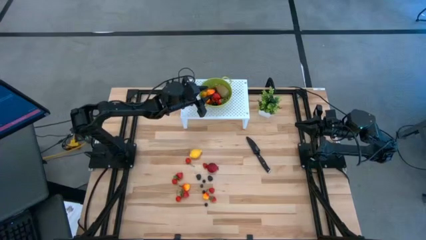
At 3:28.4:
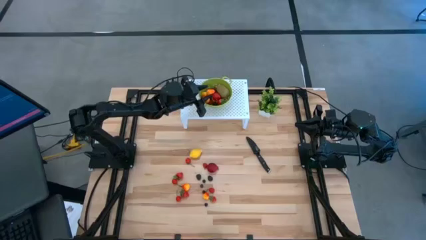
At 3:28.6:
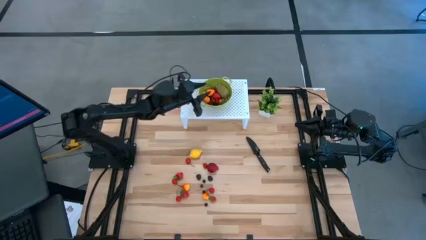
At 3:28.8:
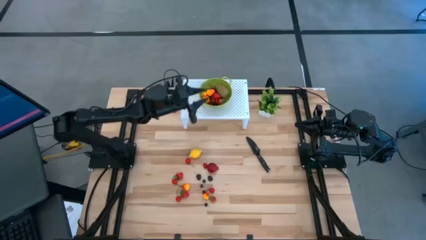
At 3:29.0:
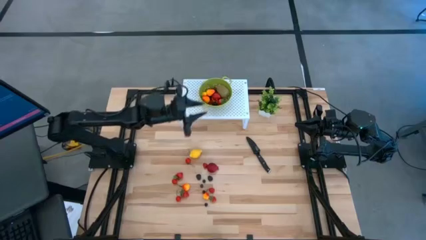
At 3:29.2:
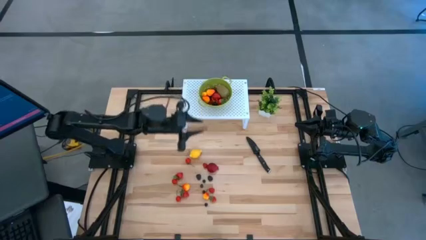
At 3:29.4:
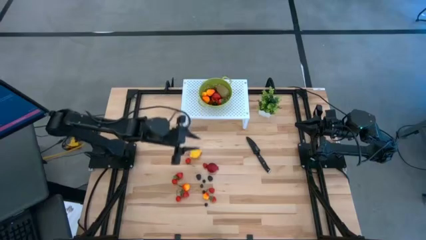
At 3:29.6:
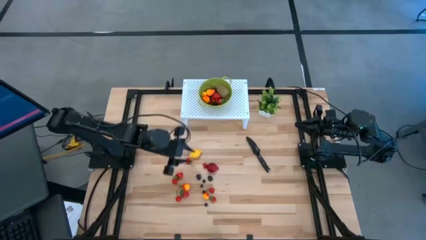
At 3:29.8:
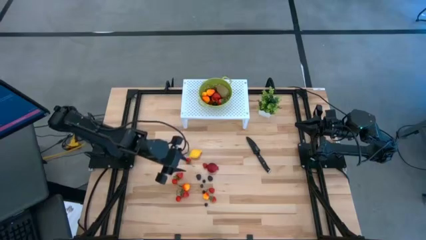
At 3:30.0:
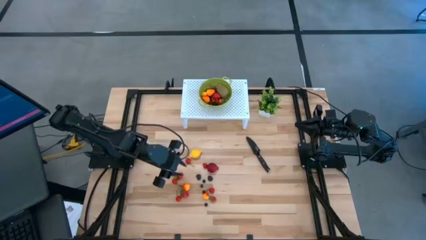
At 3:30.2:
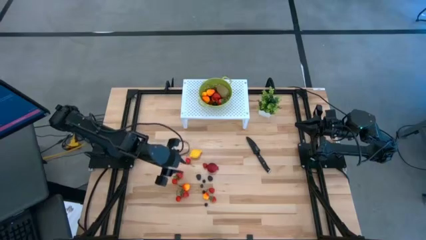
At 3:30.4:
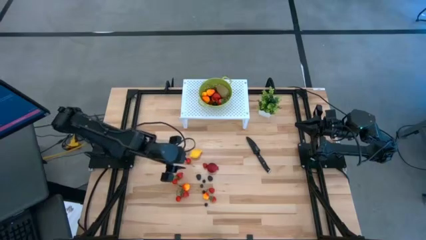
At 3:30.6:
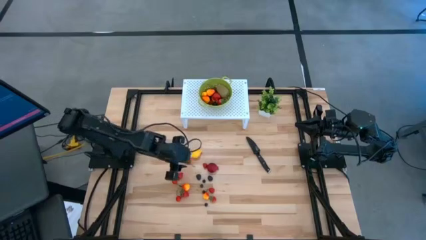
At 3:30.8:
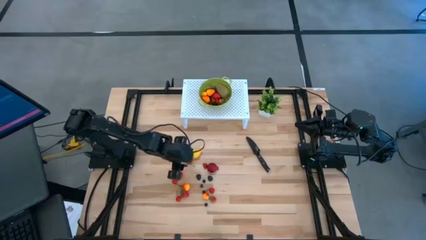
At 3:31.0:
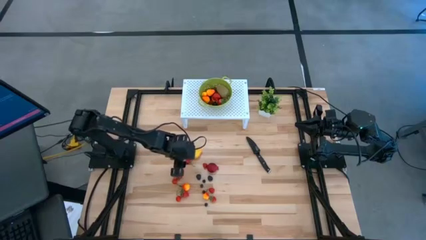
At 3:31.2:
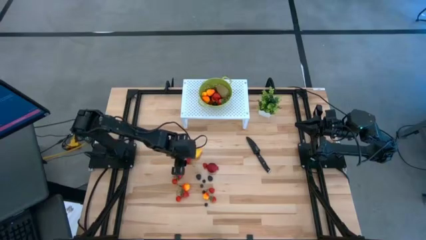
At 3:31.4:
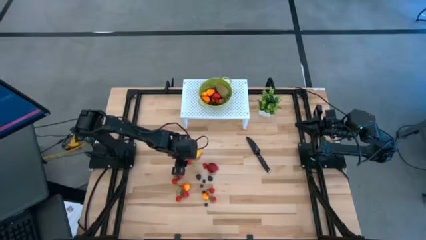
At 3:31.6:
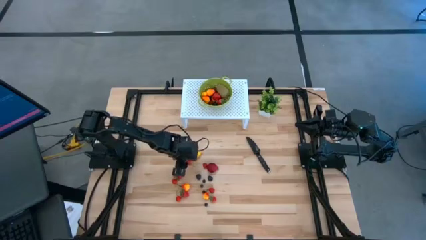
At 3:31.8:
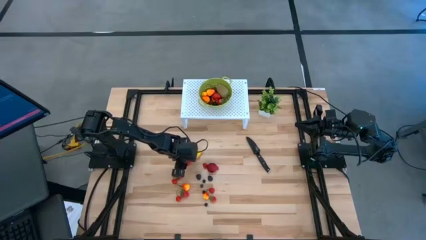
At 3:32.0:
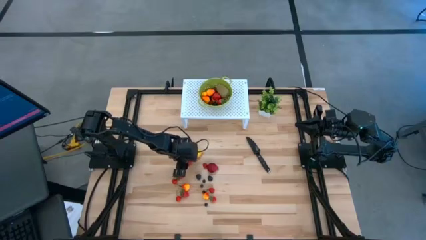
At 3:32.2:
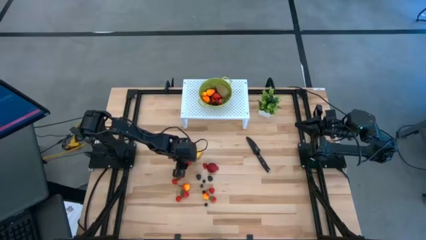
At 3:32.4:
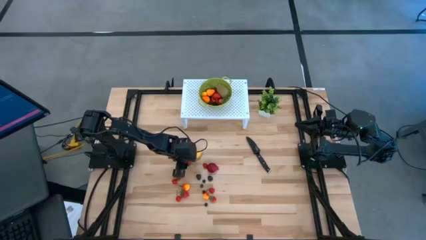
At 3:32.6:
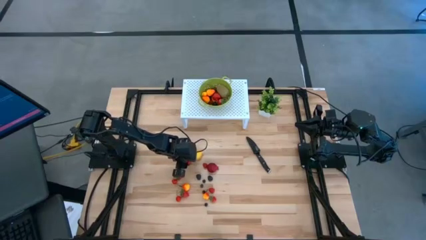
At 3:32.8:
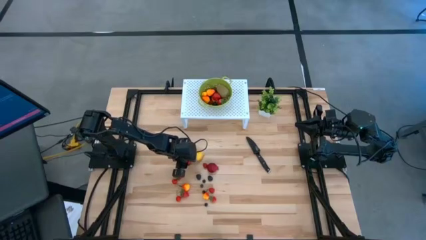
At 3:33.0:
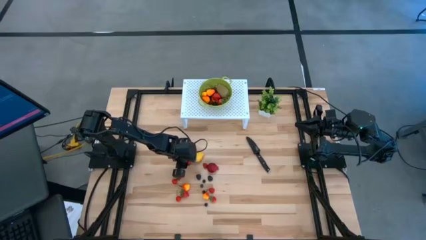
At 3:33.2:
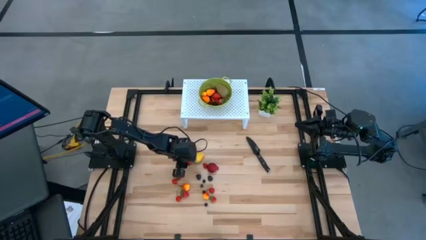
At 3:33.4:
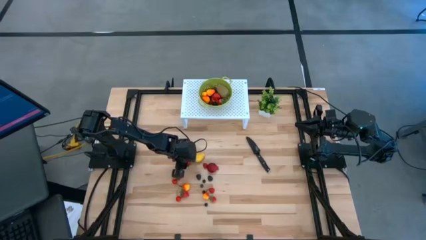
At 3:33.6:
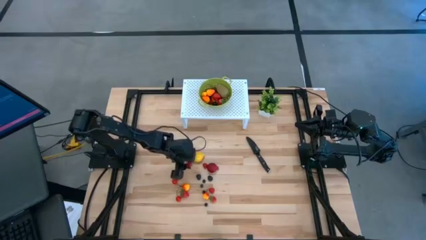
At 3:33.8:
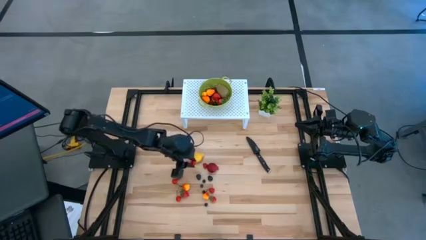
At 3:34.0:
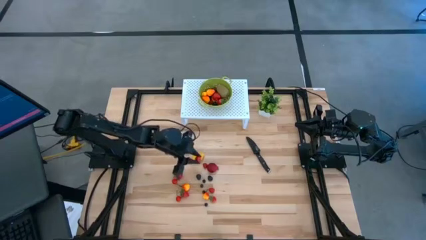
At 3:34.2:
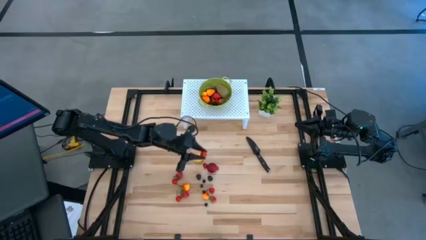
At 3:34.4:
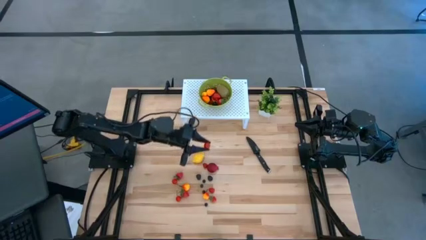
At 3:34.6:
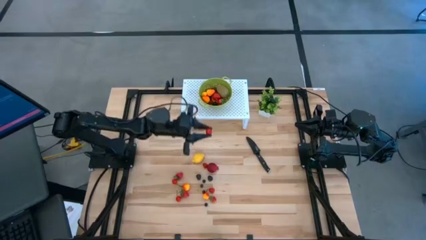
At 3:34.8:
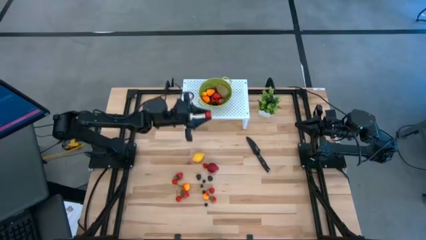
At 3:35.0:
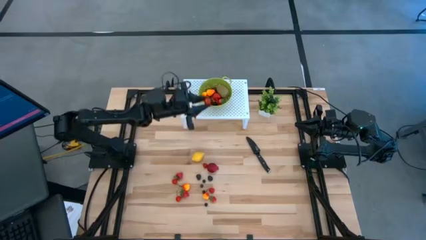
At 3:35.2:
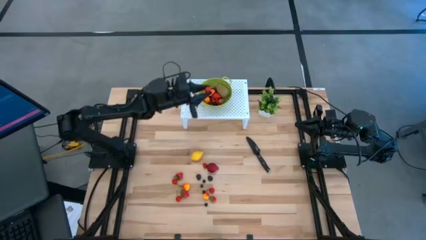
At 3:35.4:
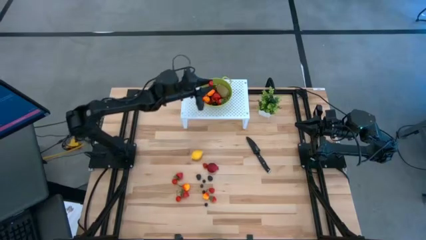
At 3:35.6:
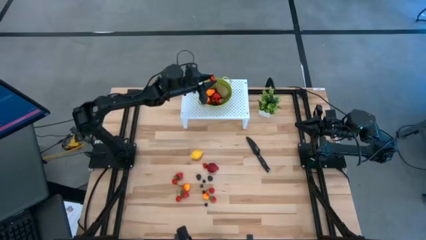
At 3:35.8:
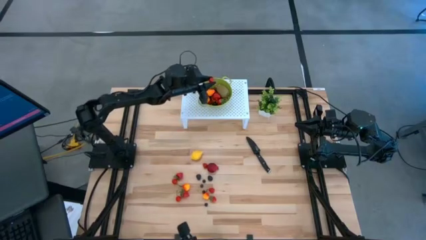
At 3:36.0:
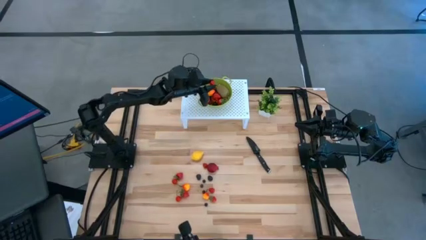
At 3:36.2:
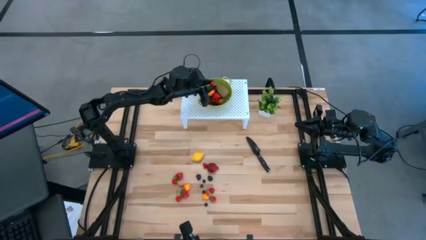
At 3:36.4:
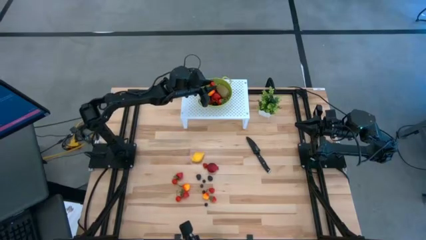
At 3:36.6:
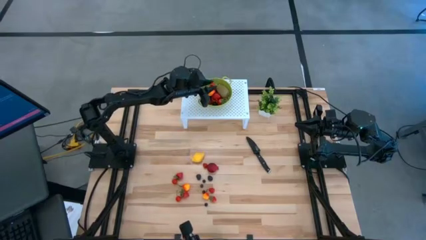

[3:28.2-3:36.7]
Task: Pick & Place Fruit
Put the red cherry into the green strainer bowl

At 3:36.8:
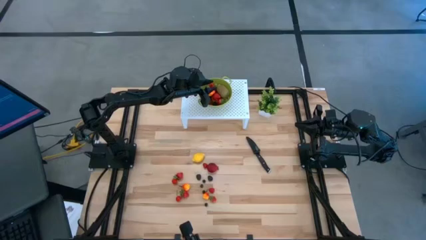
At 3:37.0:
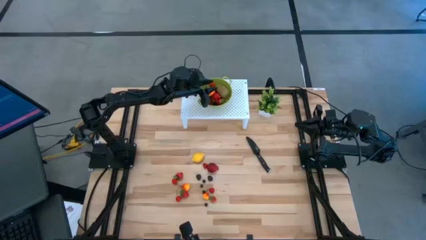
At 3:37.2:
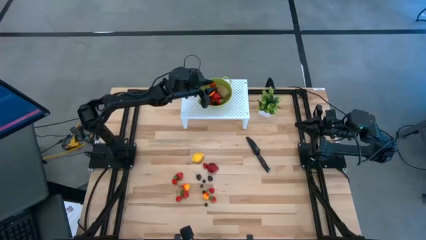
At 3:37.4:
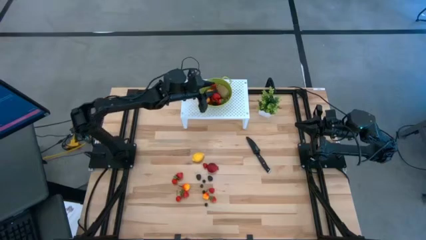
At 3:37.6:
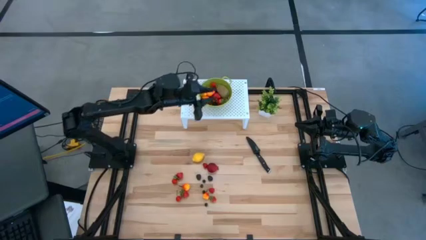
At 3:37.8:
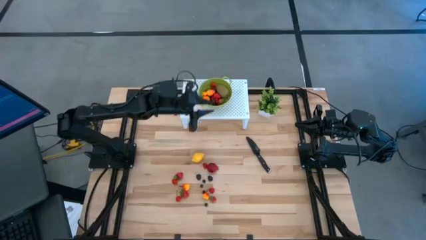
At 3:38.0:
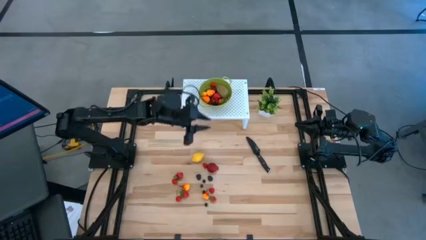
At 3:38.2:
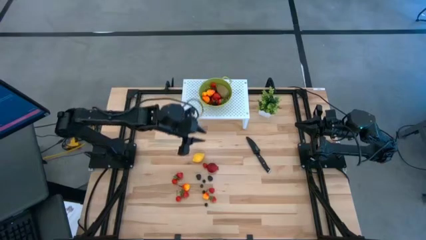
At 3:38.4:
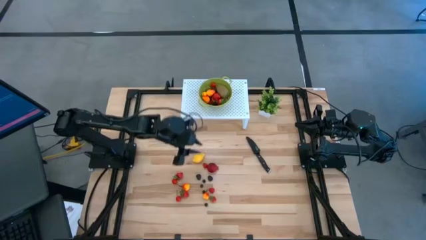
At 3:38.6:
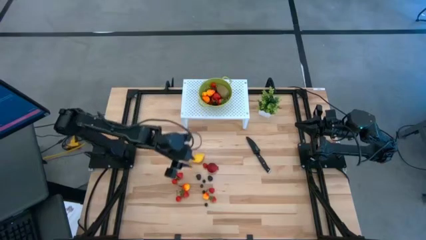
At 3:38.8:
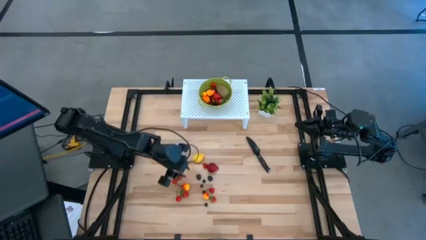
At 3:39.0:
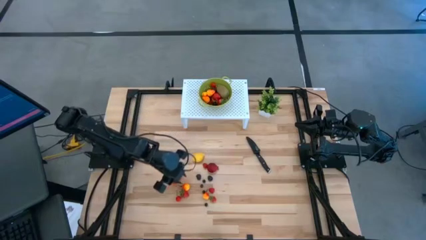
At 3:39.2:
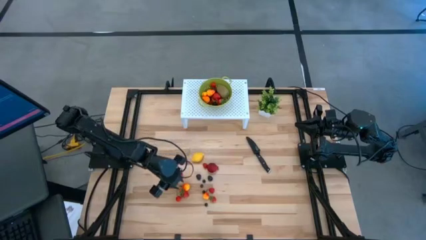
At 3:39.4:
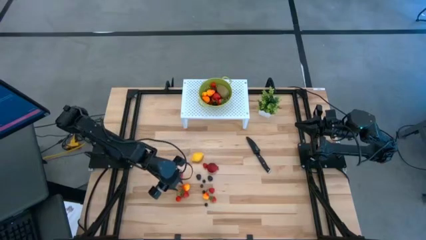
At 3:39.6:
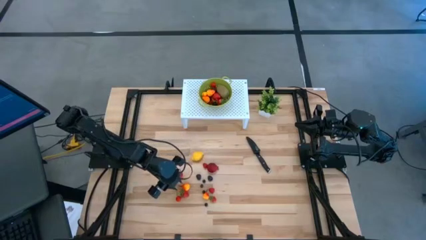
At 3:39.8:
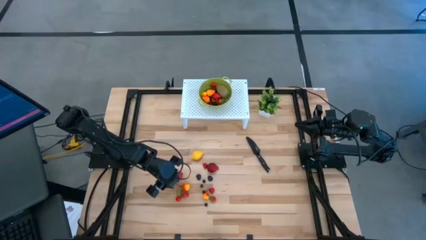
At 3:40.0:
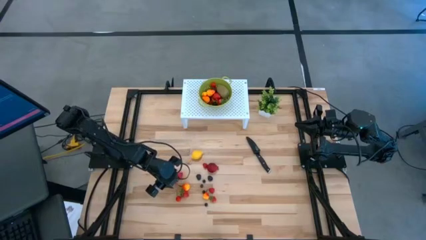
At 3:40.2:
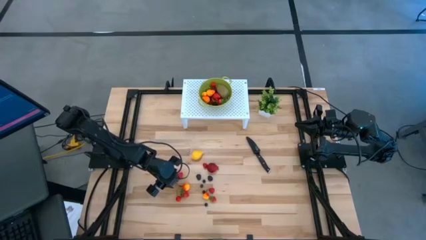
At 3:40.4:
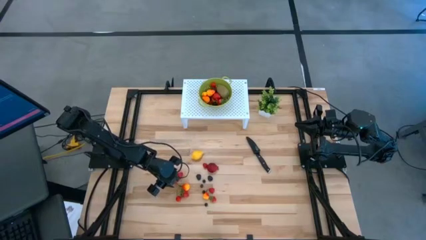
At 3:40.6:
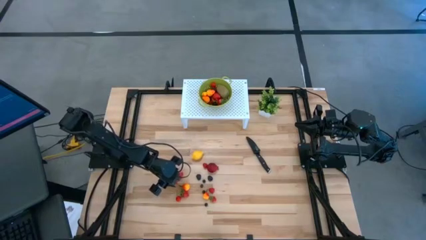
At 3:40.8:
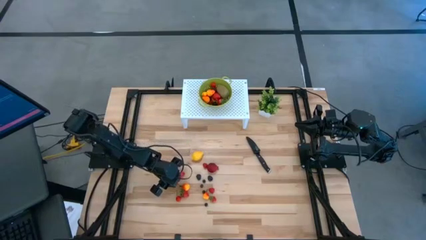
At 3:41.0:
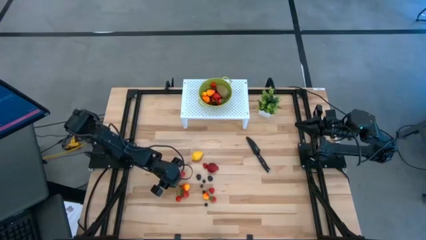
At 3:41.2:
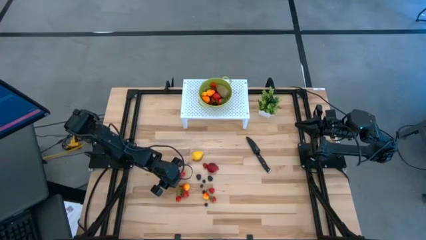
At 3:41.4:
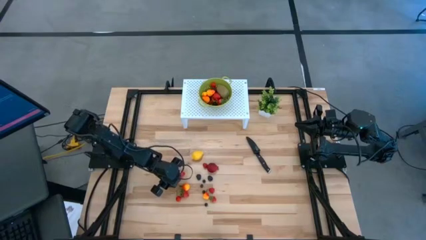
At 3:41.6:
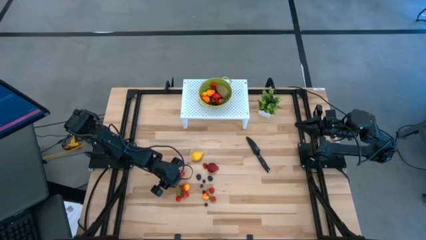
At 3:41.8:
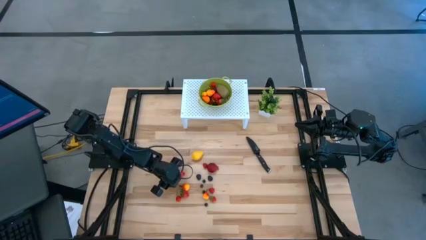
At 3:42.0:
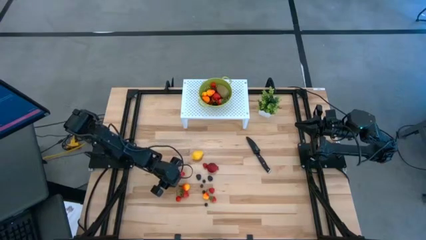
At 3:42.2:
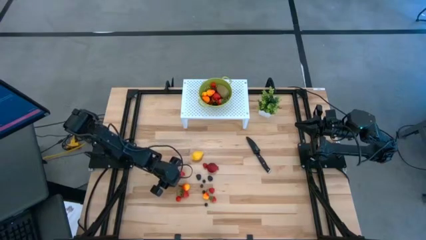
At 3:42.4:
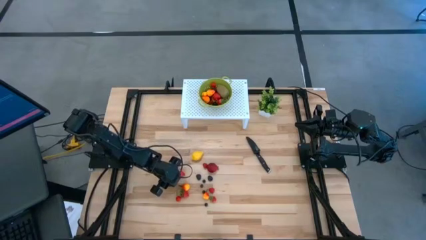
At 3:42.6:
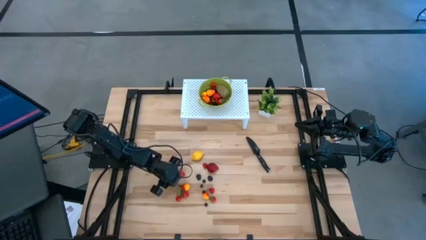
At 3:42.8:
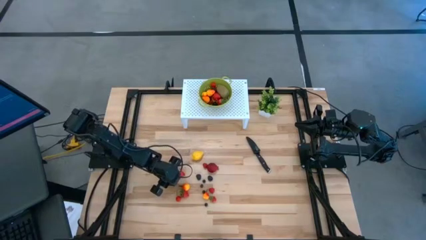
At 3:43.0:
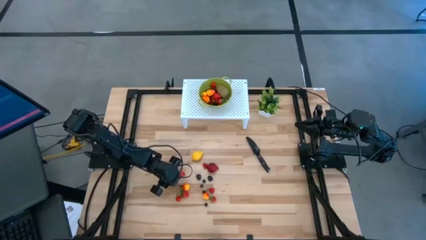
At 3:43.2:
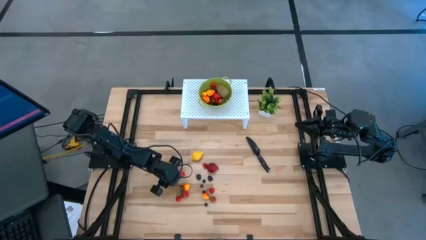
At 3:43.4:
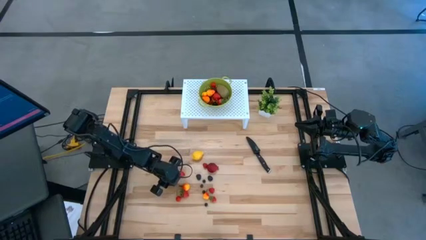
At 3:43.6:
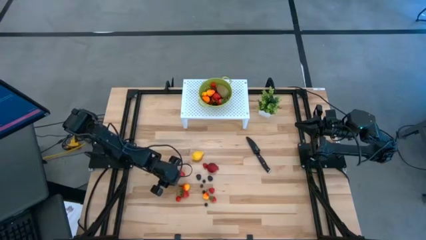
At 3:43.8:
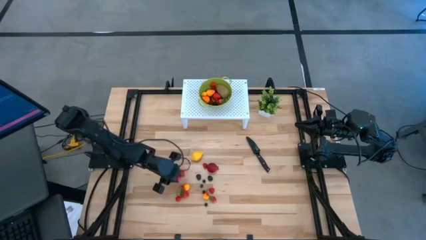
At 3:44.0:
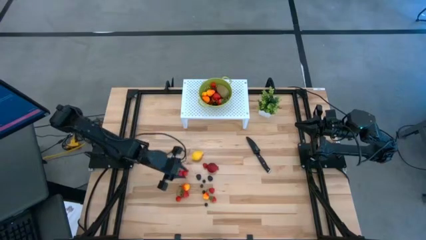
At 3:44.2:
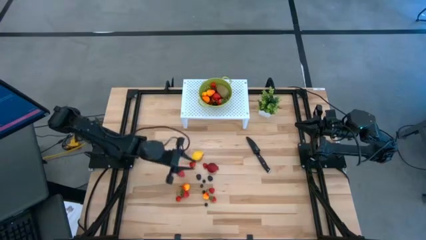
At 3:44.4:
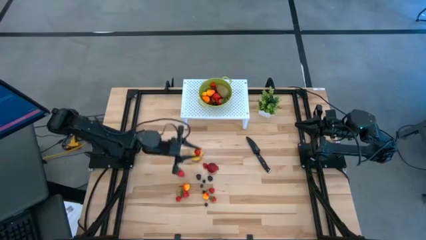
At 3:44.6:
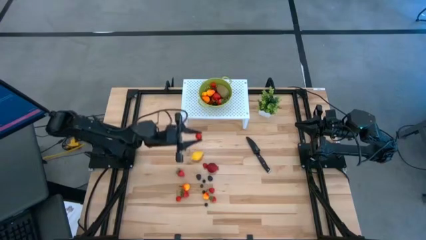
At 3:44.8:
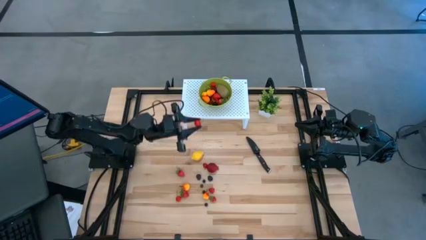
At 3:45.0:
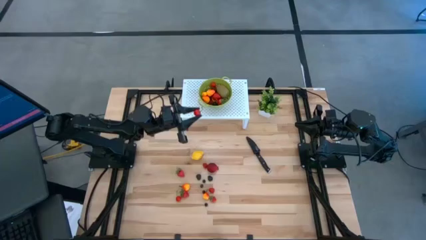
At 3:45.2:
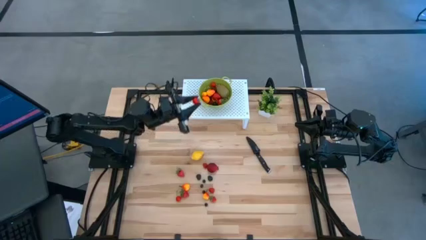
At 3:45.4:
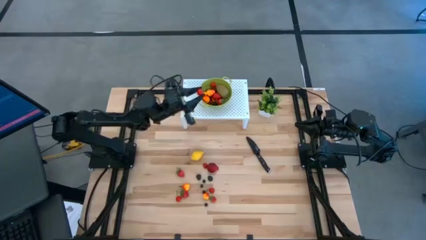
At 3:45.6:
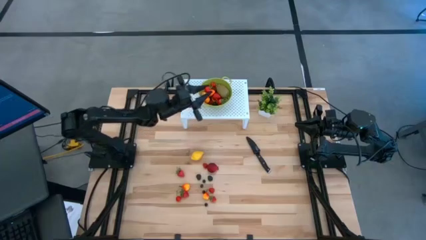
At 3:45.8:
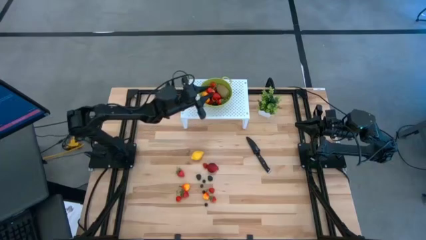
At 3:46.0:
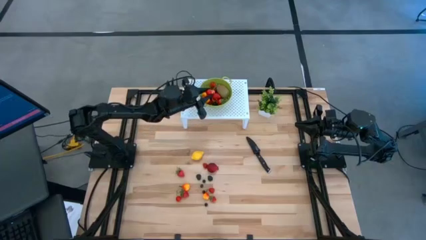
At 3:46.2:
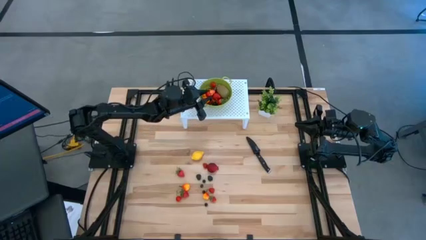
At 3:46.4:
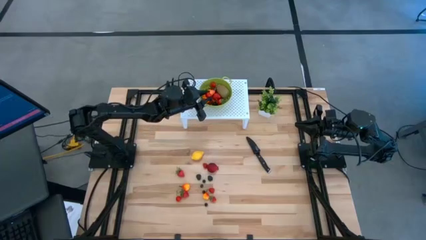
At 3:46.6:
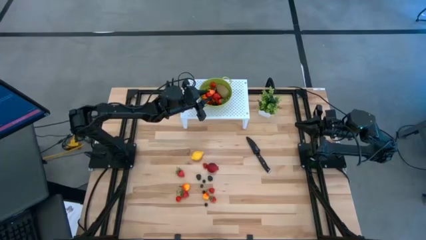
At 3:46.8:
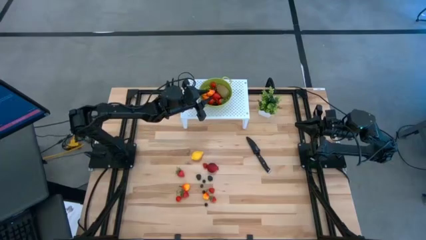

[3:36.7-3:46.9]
Put the red cherry into the green strainer bowl
